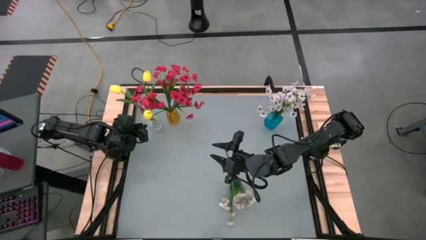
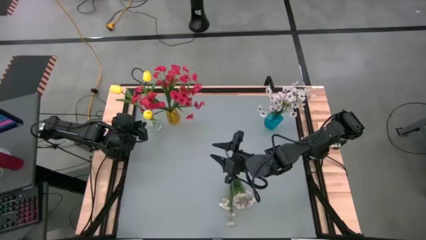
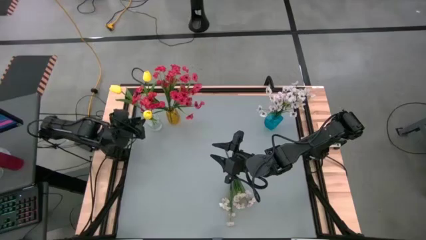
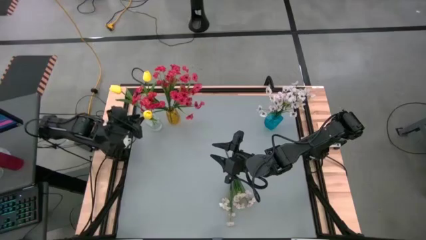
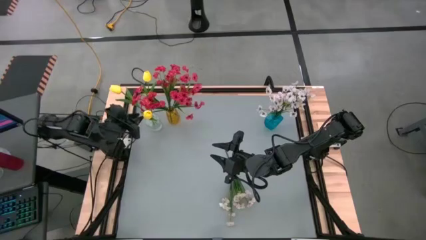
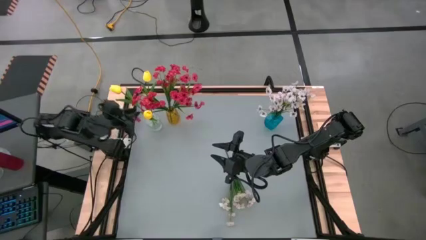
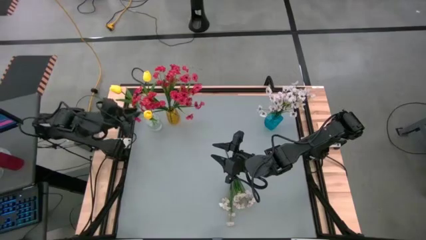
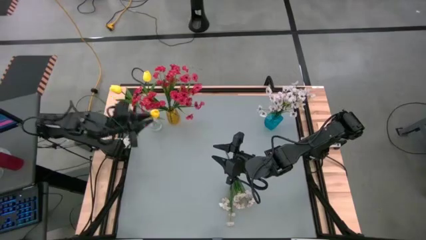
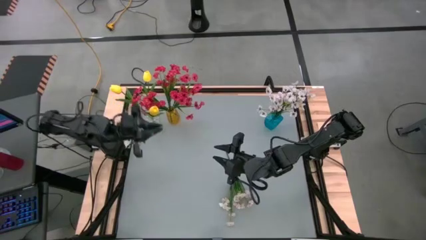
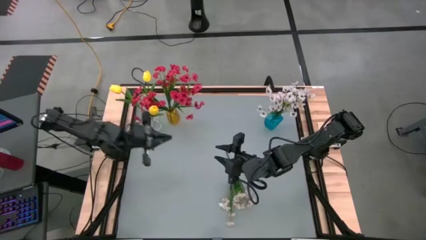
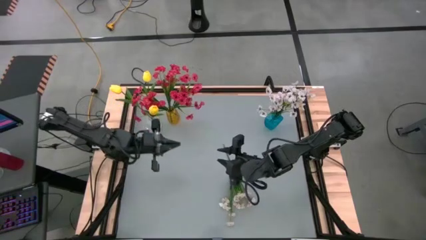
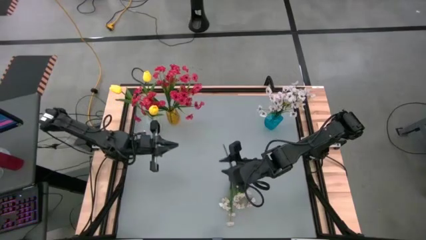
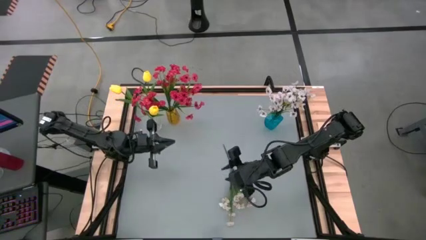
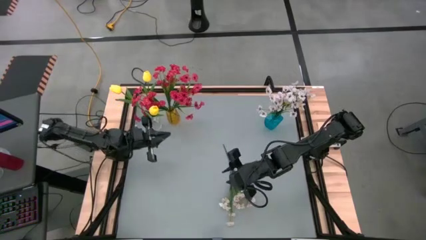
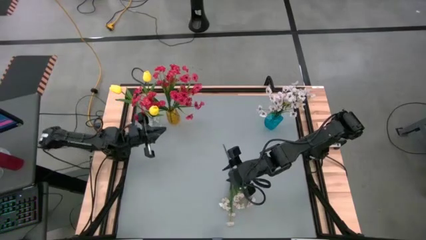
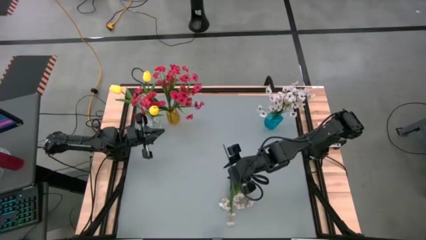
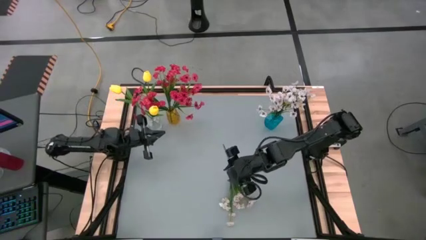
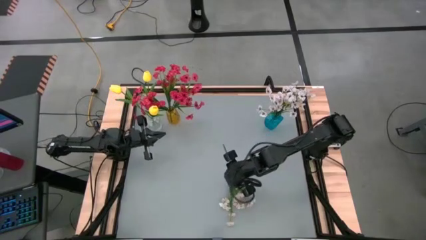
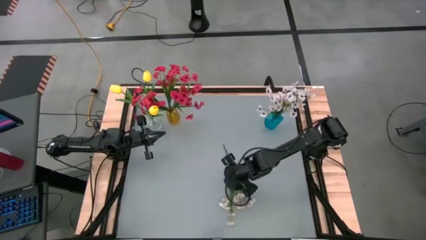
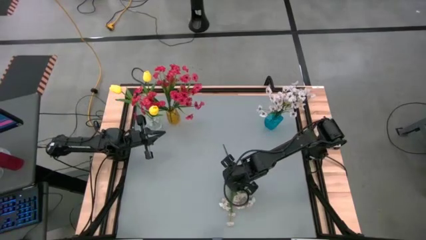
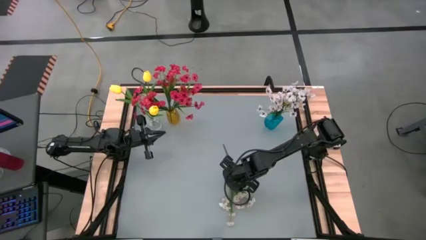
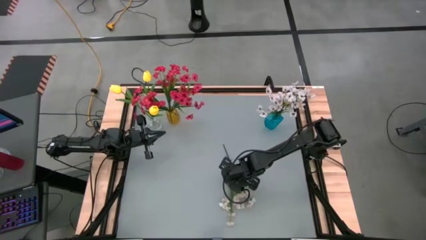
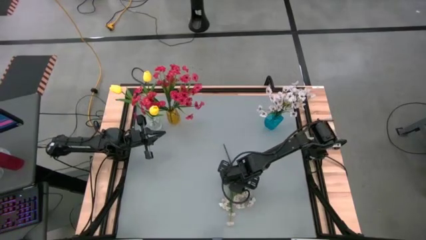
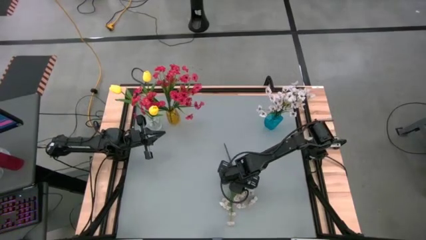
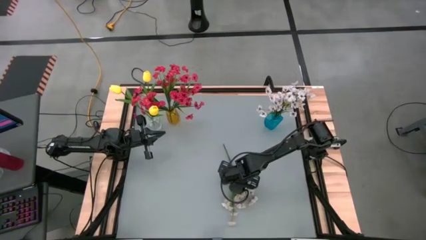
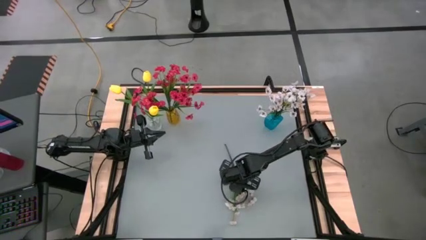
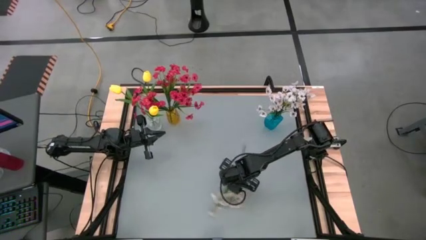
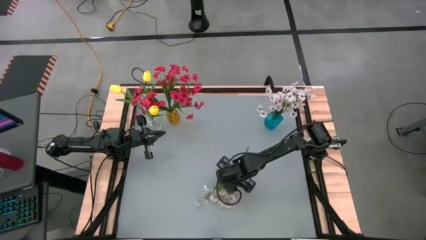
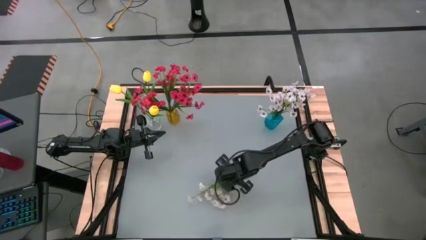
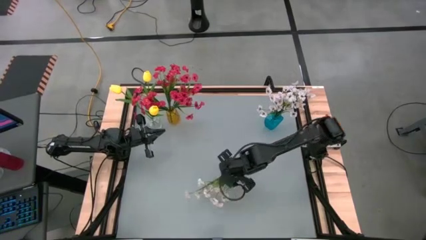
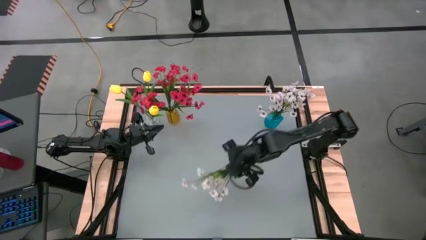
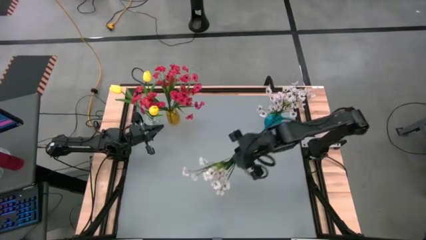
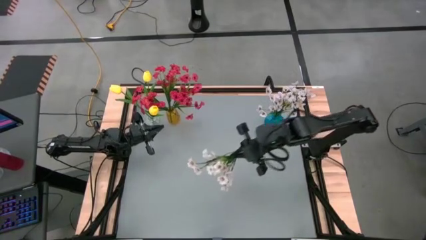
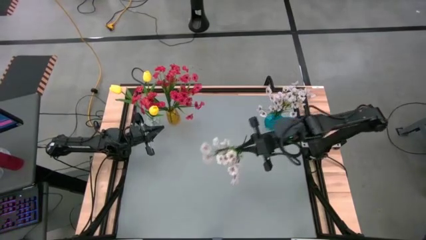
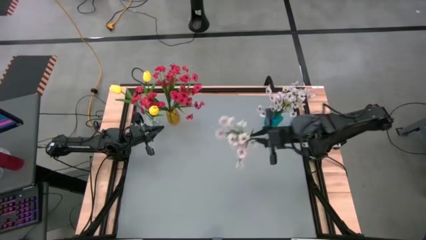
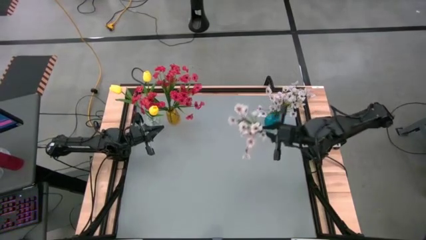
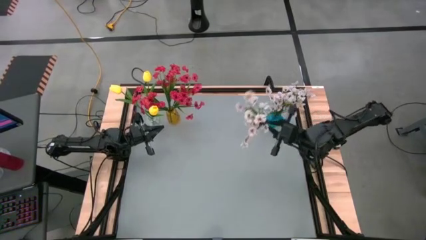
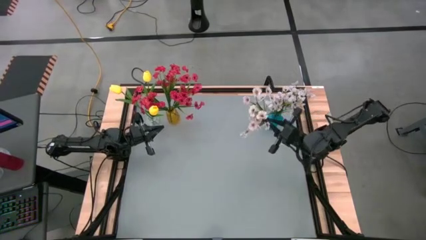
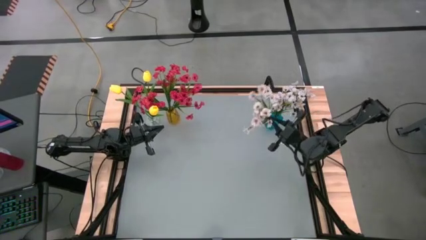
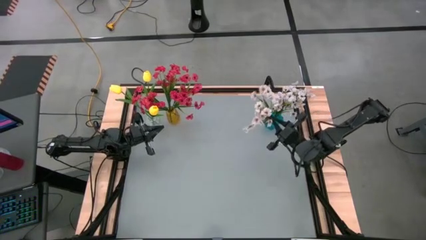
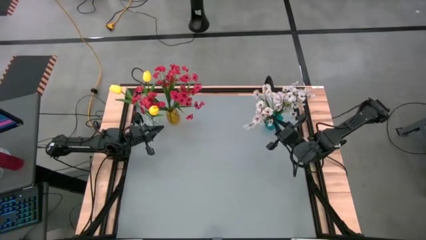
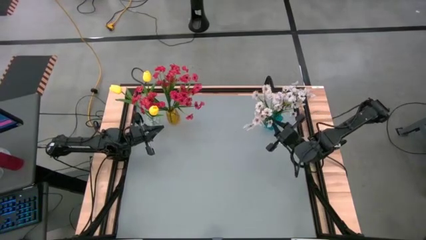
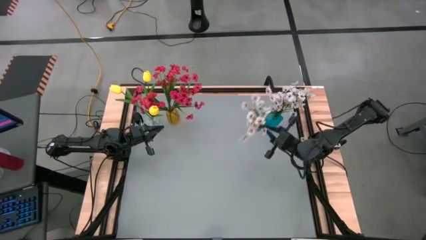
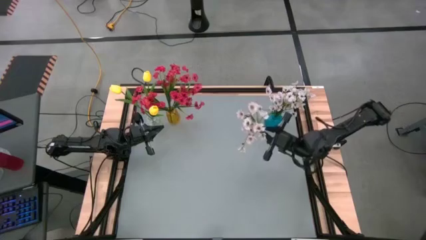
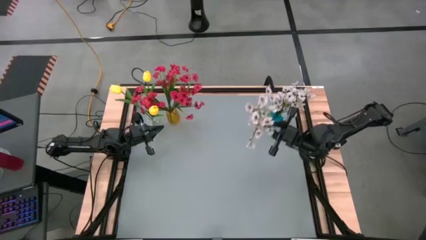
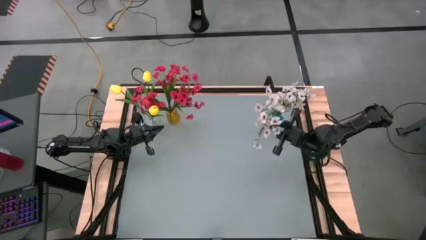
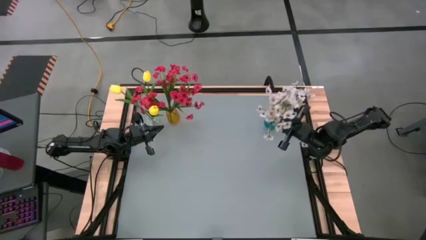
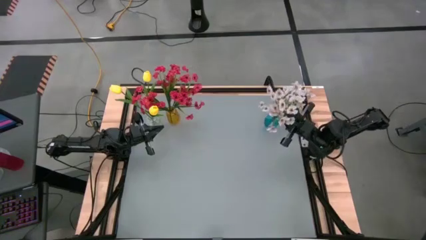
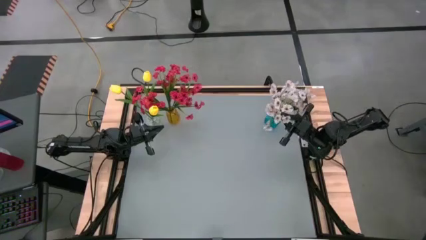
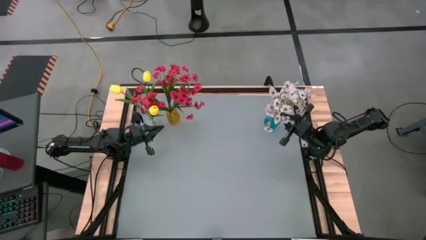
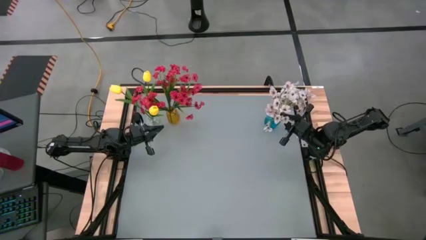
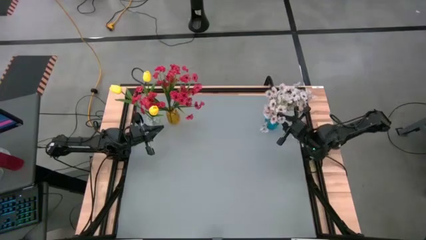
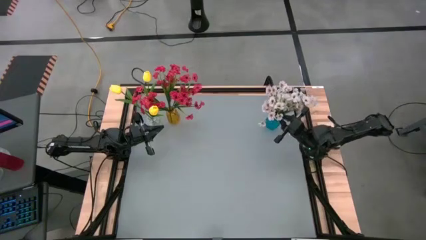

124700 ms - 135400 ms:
Task: Sort flowers into vase by color
Put the white flowers into the blue vase

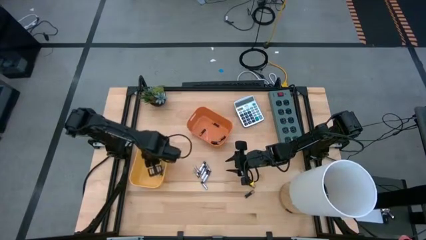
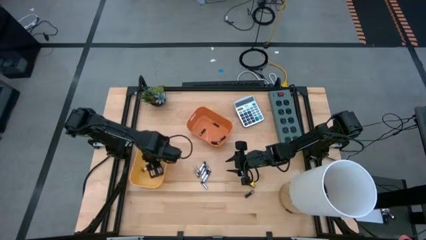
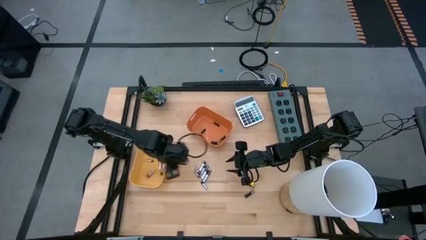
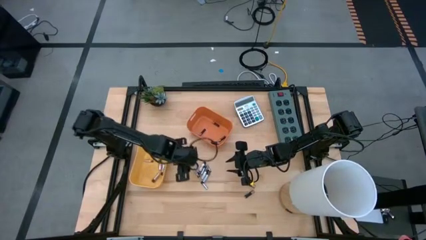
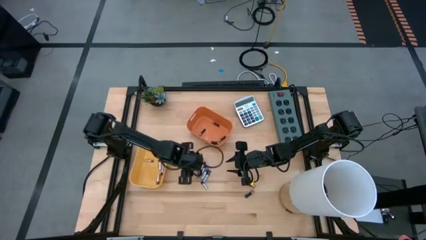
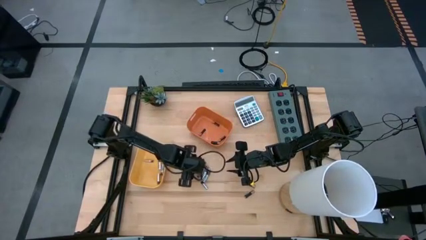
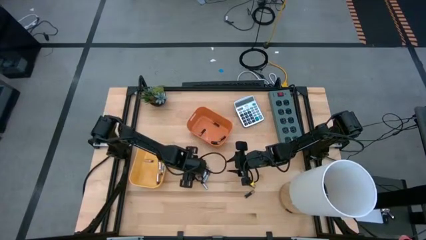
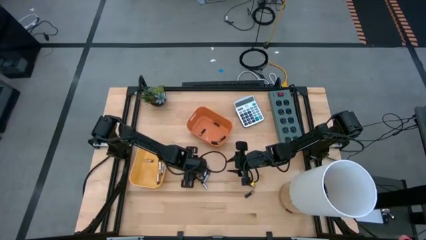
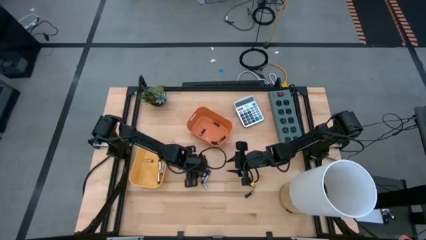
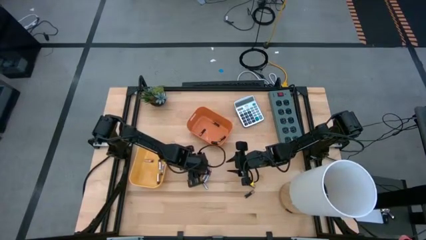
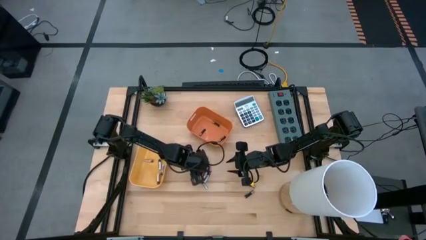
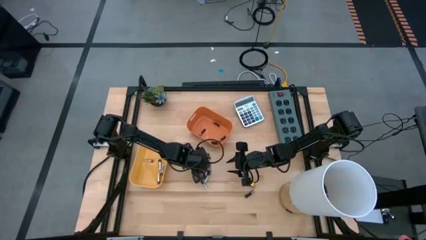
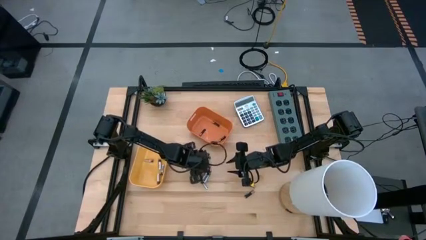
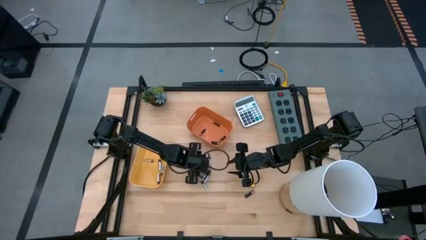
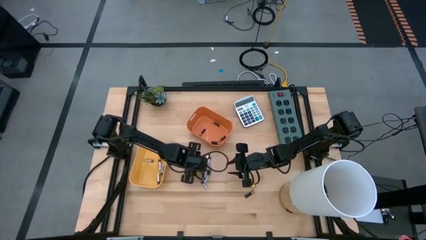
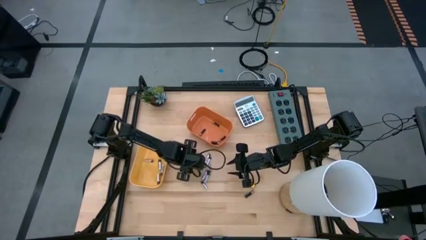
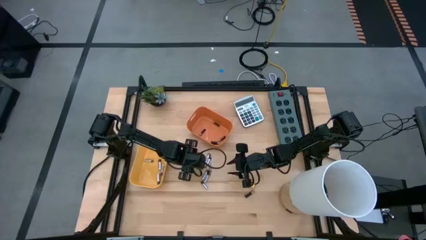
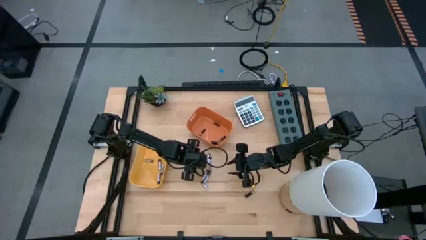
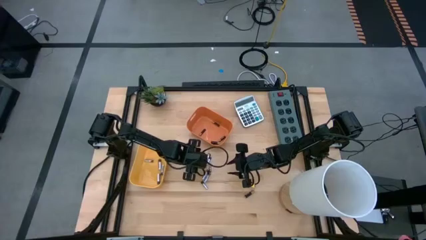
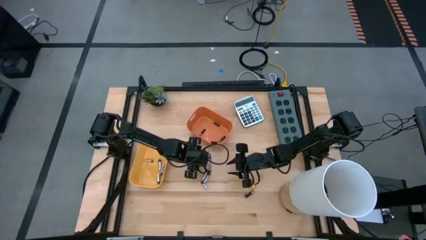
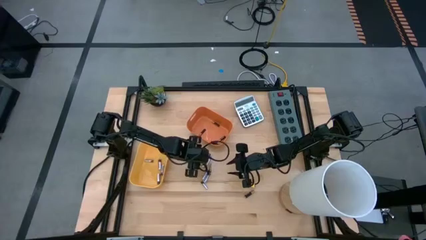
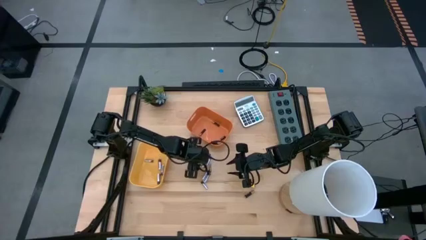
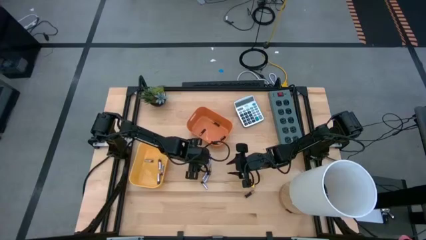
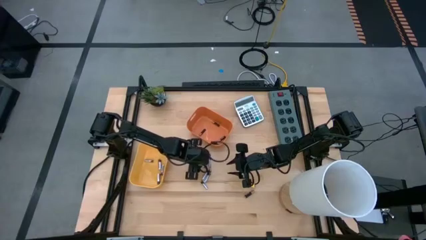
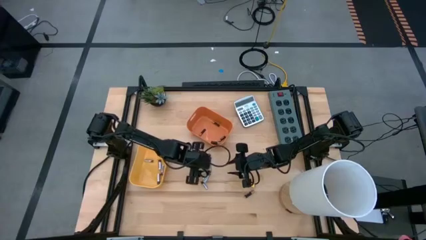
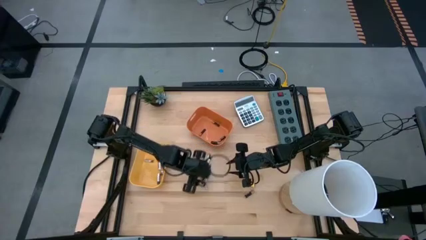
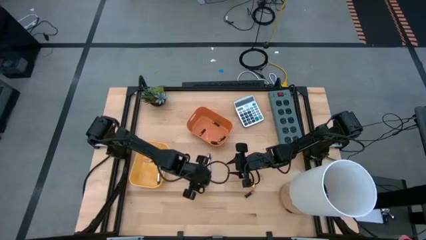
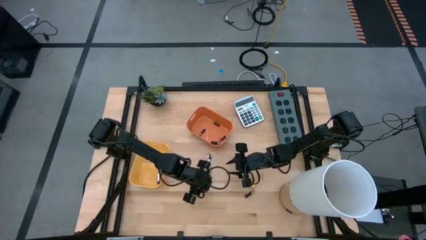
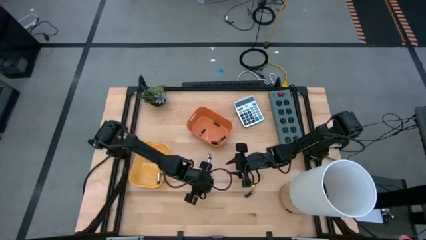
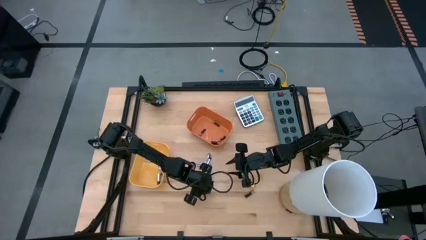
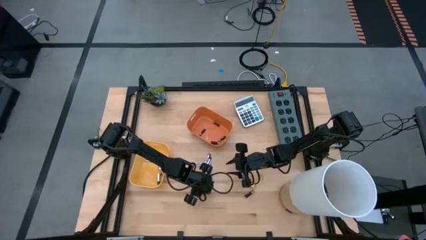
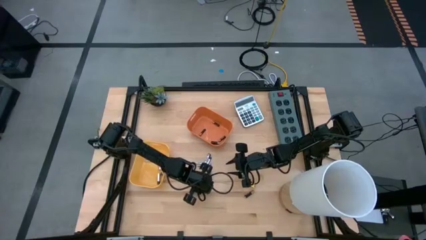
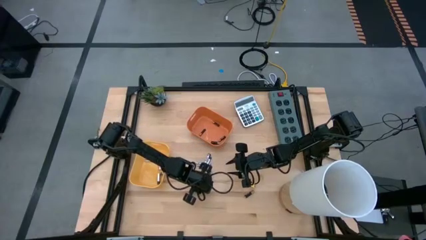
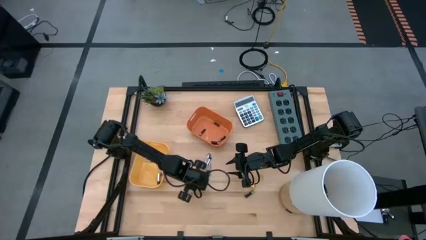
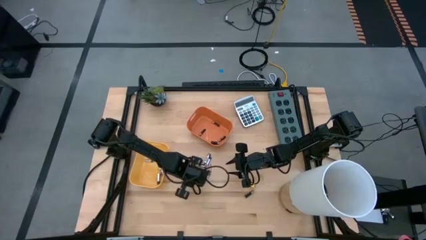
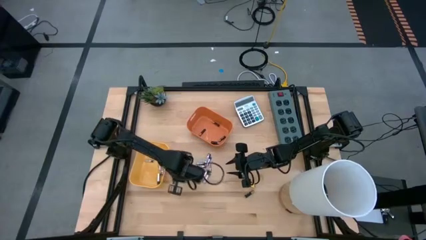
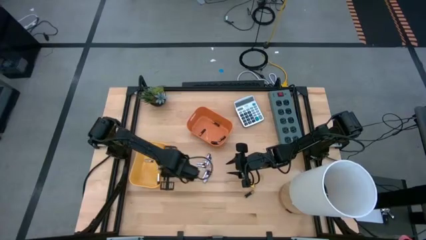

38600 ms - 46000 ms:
Task: Sort batteries
Put the silver battery into the yellow bin
